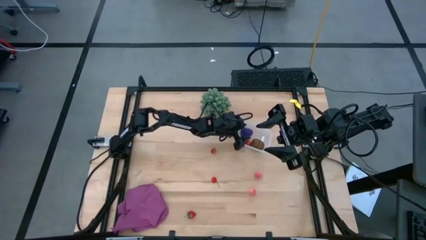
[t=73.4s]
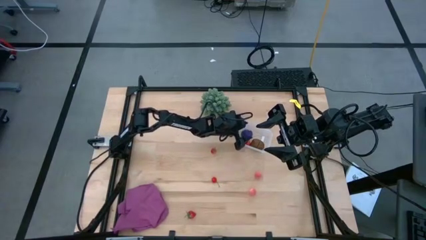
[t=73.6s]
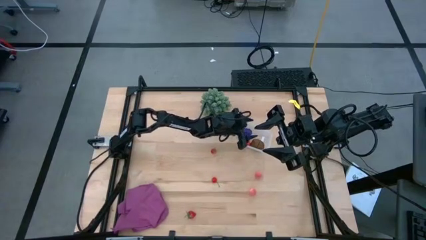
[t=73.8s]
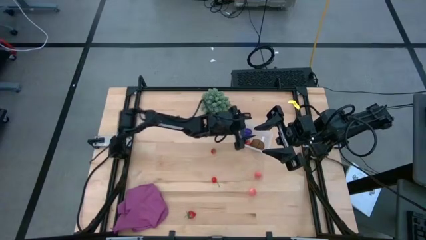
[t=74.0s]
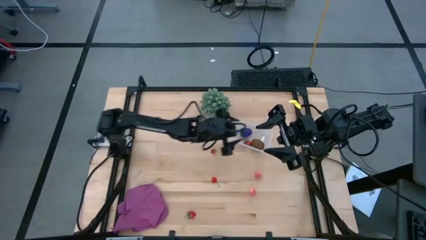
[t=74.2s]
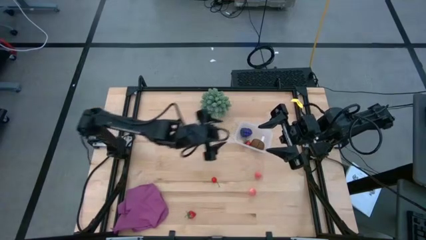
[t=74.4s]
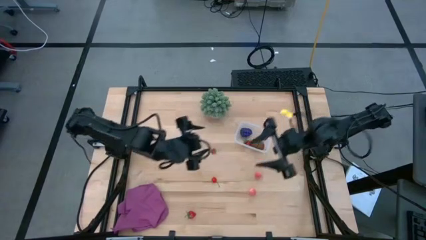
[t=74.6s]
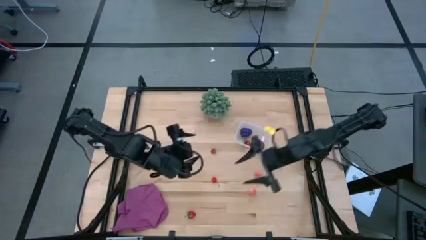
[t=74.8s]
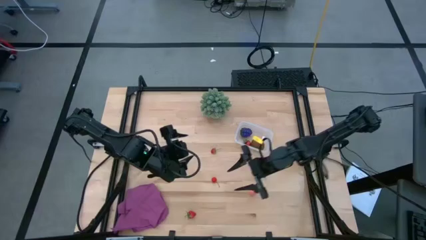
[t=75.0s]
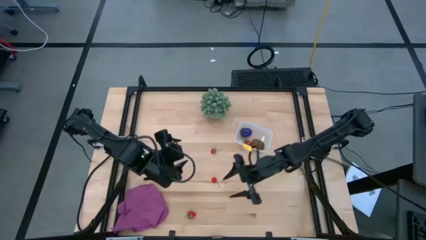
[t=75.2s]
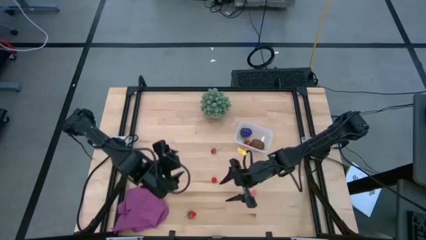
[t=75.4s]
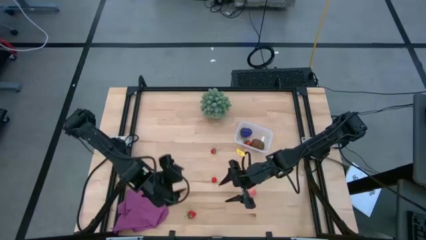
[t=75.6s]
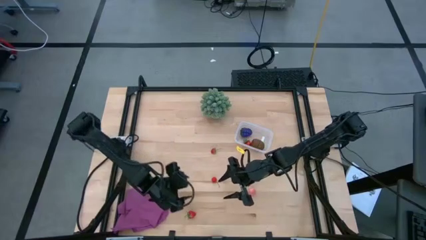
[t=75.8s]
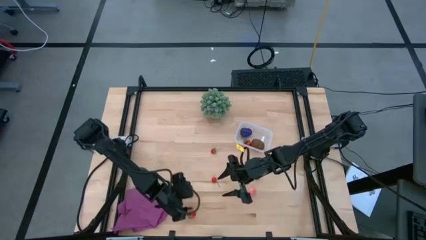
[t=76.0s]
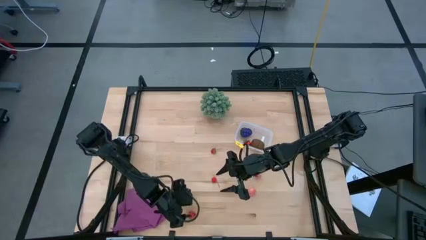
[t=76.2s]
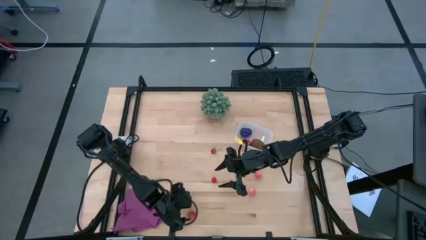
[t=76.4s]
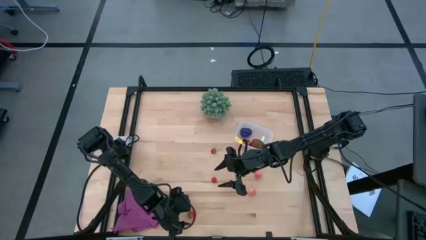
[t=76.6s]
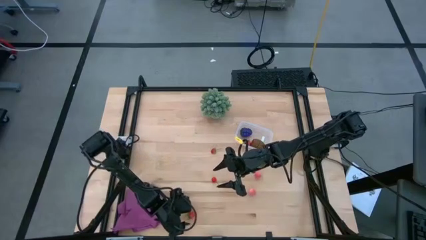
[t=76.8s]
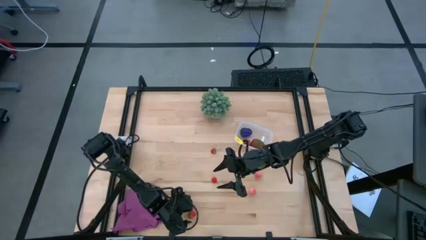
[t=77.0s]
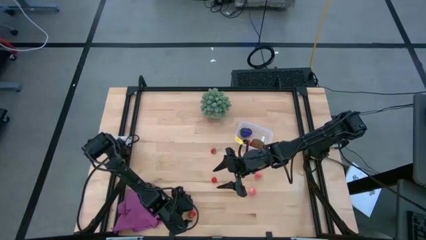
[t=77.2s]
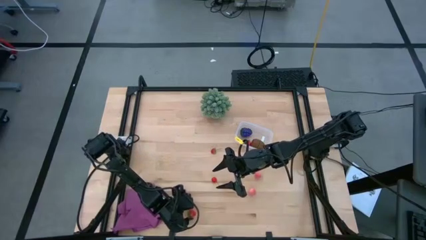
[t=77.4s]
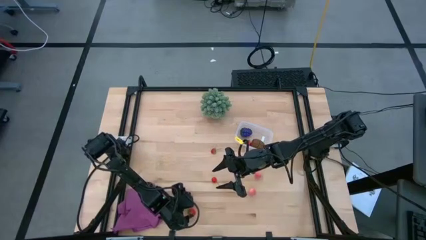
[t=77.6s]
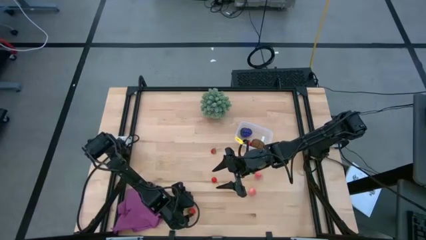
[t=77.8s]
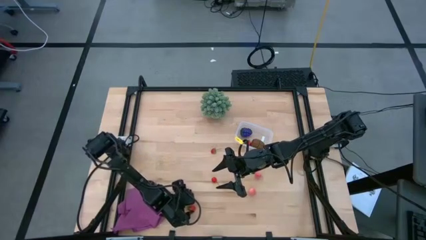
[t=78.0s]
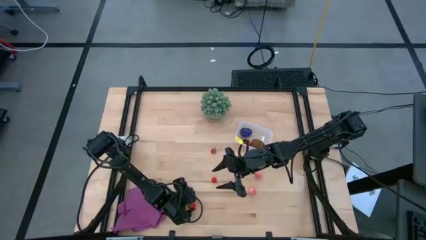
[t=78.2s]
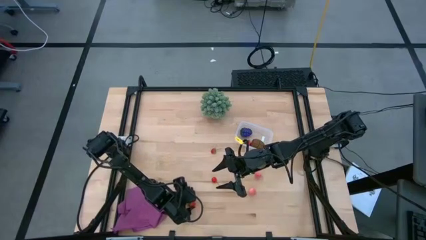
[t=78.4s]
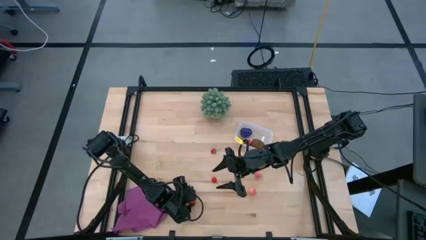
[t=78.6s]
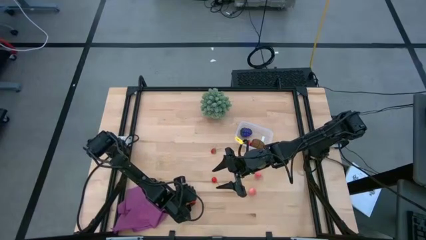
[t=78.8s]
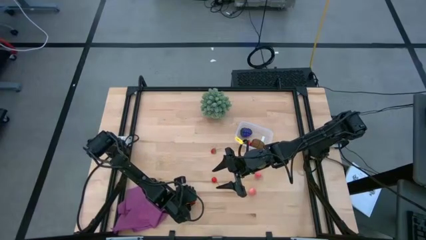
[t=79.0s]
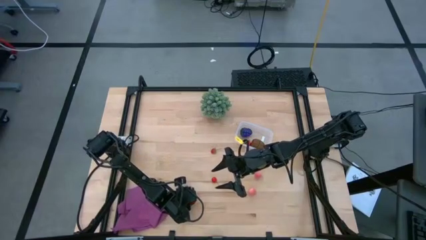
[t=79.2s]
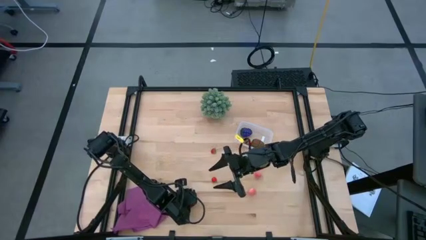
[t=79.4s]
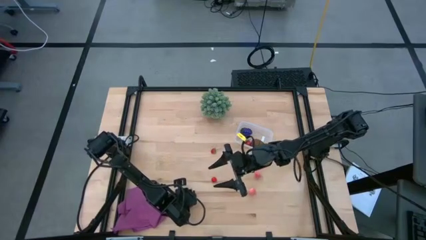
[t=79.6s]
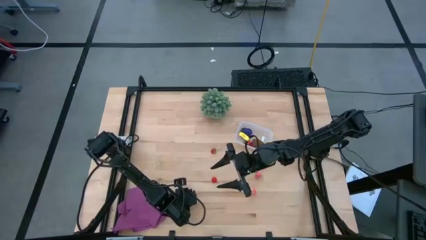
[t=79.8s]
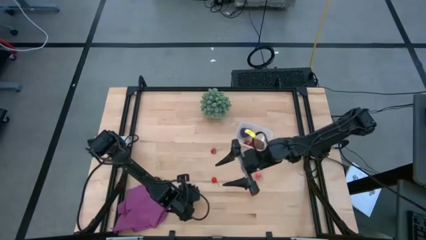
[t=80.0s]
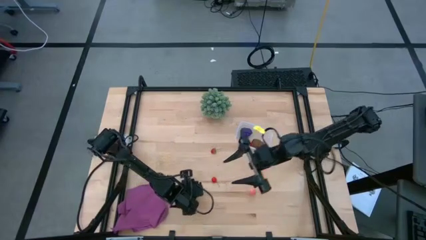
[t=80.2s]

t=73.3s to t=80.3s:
Task: Pick and placing Produce into tupperware
Put the red strawberry into the transparent bin

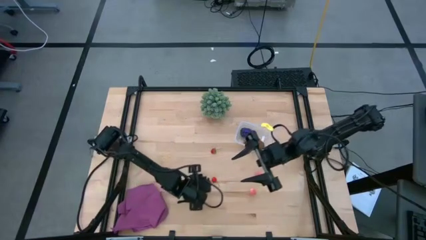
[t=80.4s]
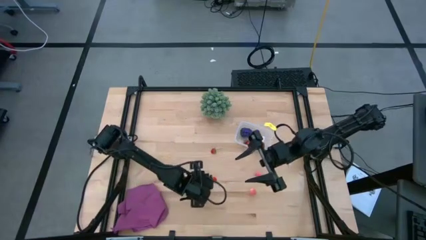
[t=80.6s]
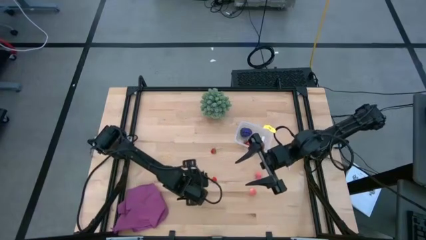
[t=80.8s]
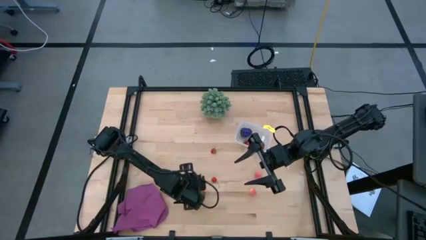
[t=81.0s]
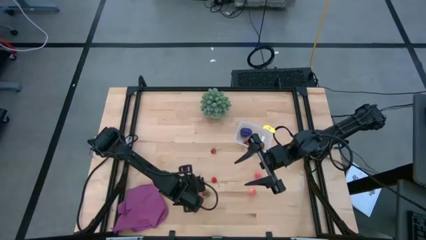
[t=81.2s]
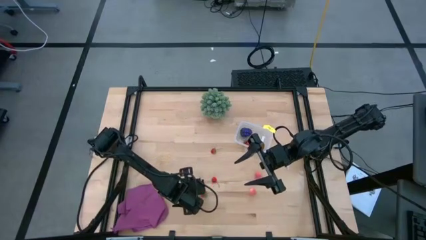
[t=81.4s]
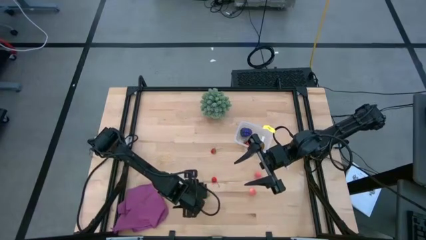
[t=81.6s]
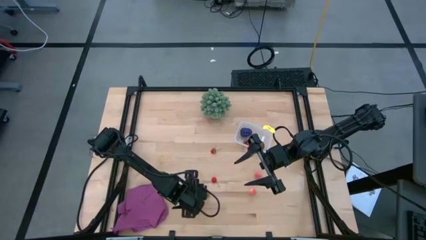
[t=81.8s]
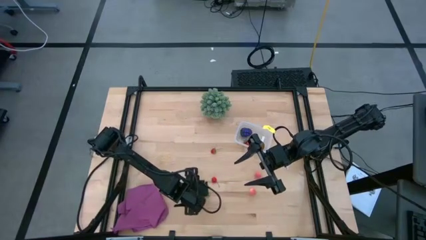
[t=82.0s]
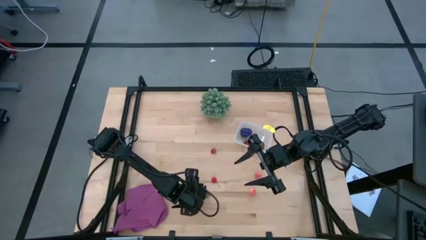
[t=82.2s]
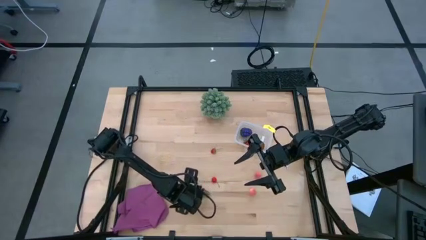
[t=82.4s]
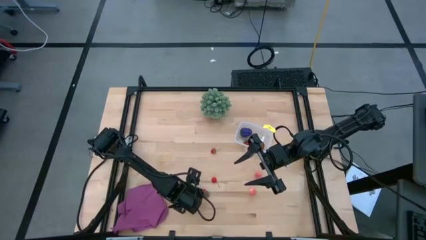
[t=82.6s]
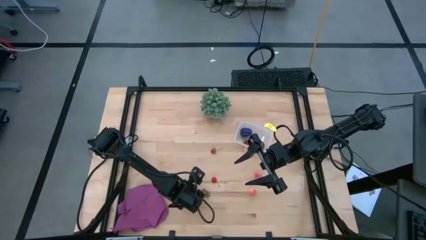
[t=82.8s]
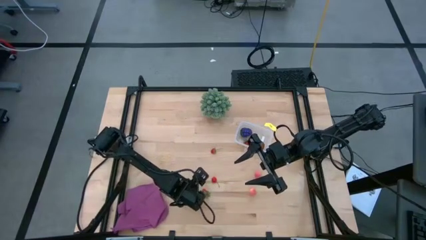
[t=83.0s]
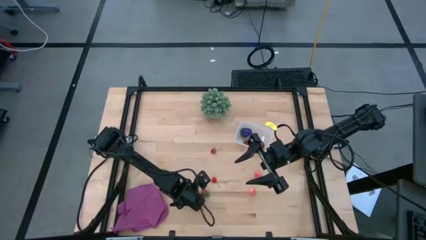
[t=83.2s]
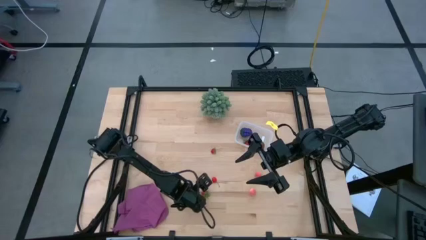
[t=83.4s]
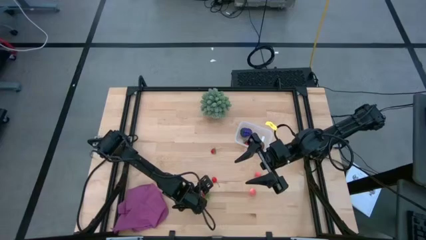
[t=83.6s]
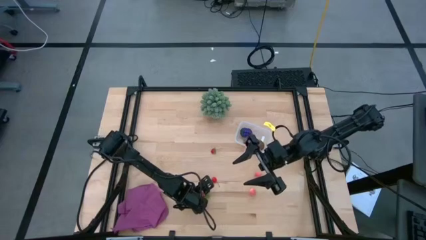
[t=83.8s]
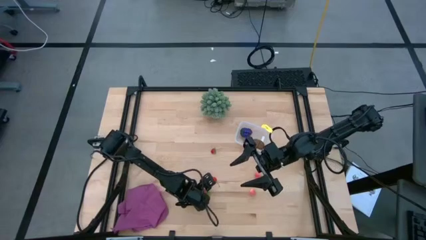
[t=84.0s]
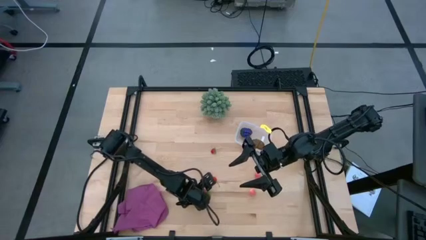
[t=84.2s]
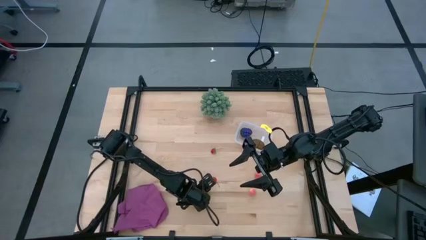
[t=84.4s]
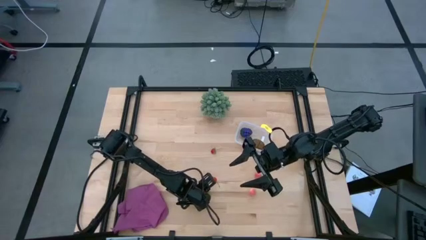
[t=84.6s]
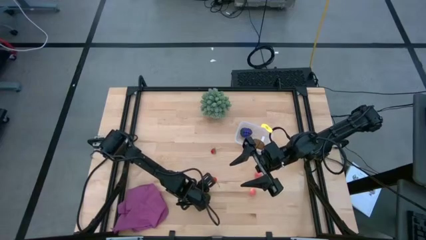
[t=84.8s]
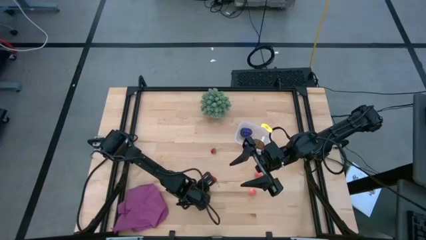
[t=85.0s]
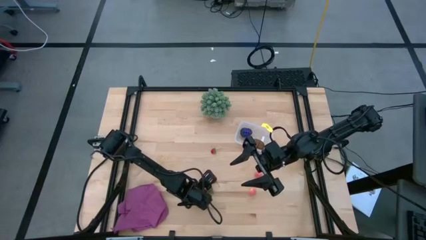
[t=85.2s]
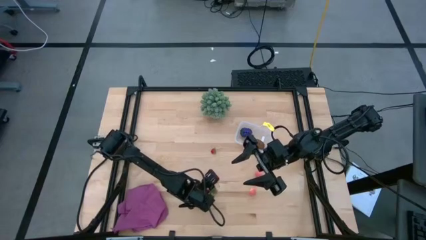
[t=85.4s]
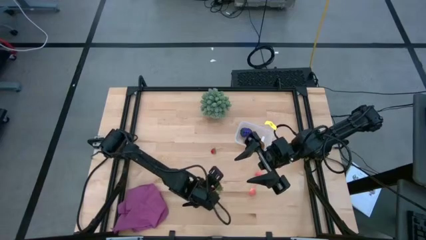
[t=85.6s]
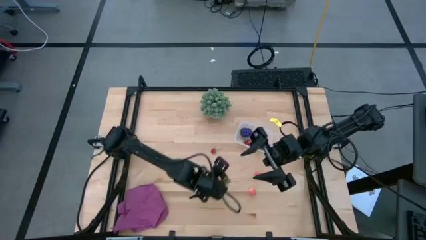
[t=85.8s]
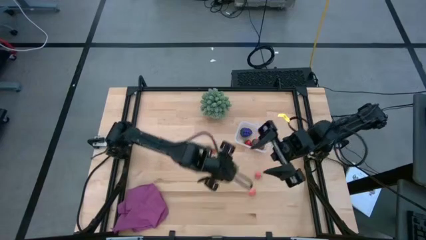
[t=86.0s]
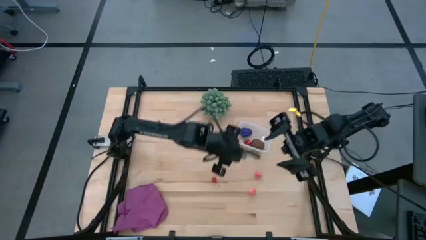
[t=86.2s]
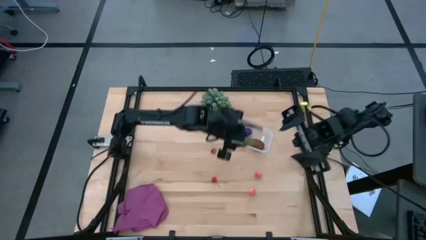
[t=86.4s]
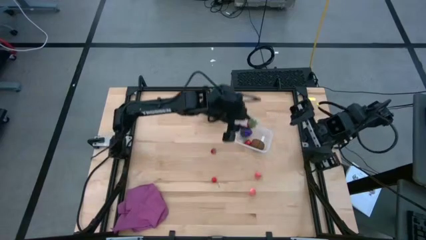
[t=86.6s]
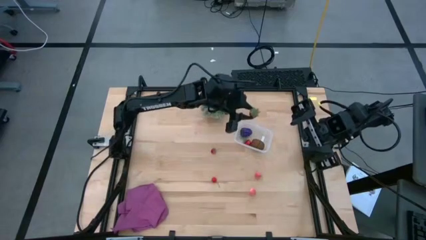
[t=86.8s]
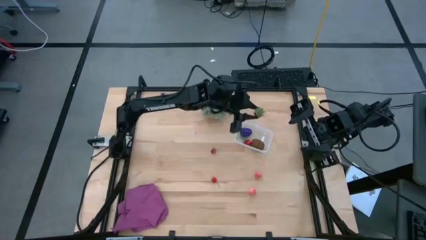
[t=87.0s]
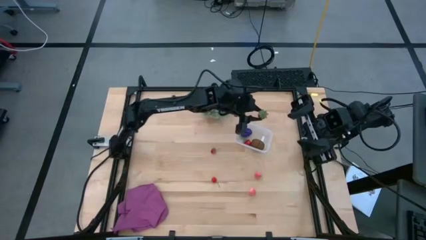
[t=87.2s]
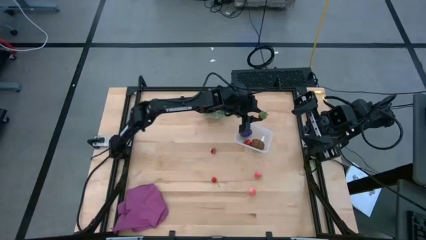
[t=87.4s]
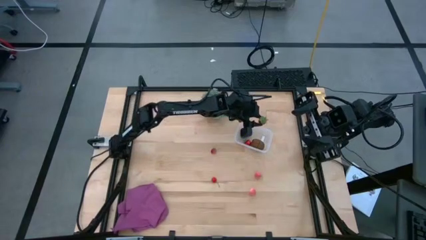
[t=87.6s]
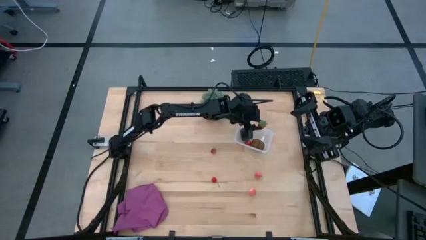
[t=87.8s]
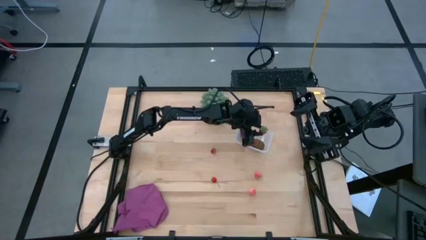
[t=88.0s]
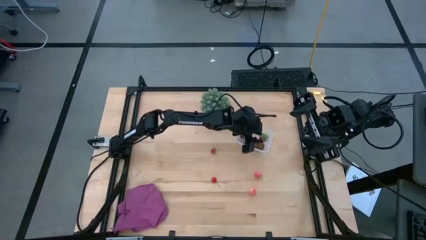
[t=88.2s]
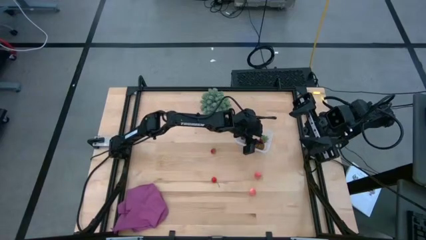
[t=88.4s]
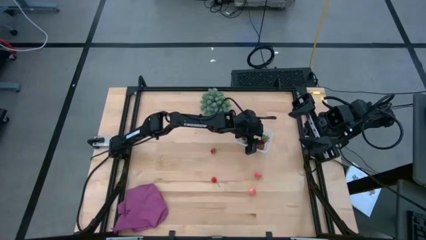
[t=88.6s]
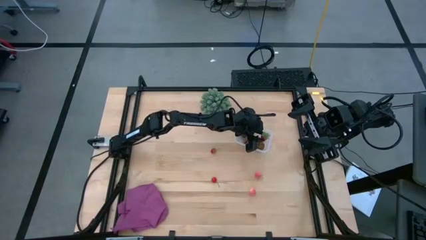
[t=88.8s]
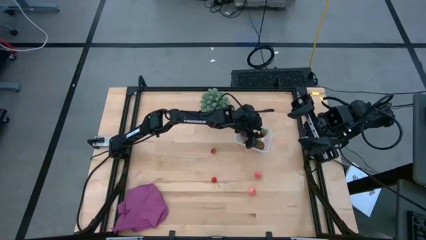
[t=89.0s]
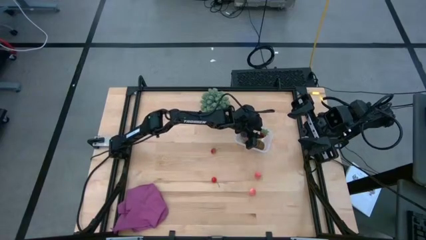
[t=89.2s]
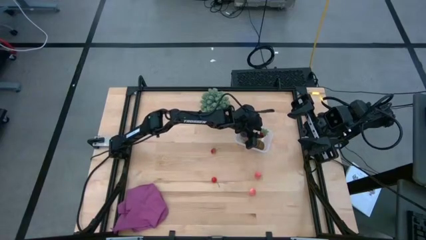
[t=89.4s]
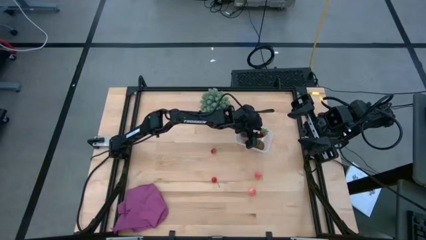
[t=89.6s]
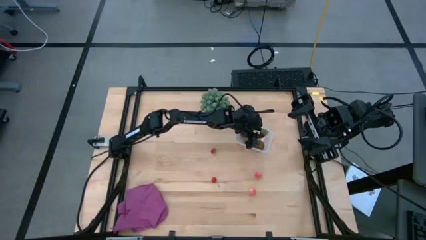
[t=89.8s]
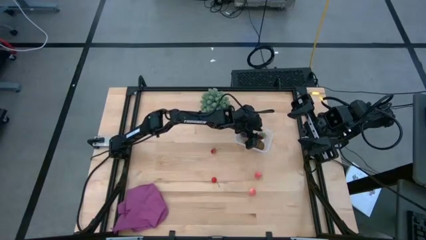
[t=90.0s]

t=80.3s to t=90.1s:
Put the red strawberry into the transparent bin
